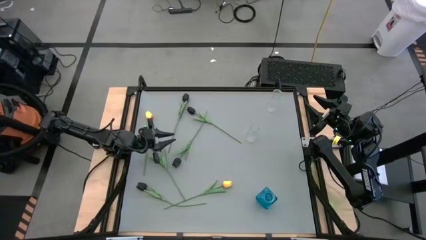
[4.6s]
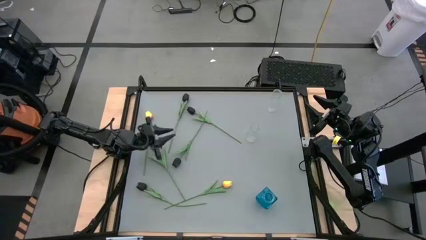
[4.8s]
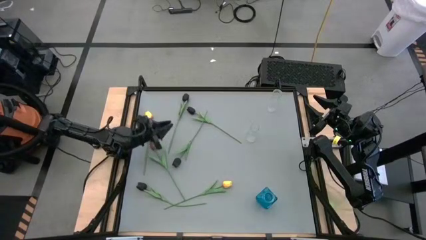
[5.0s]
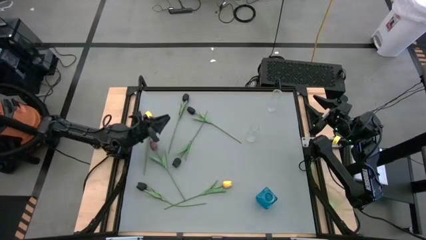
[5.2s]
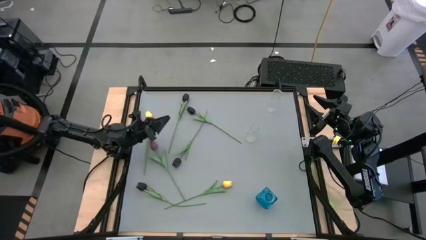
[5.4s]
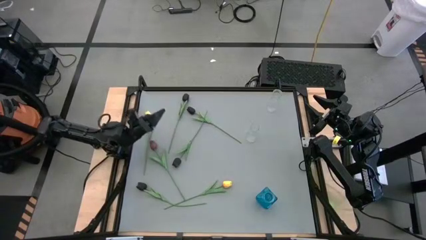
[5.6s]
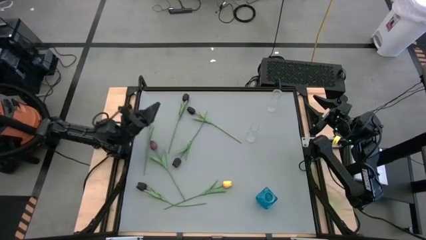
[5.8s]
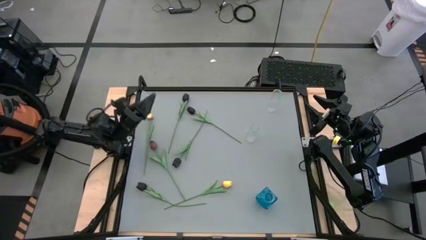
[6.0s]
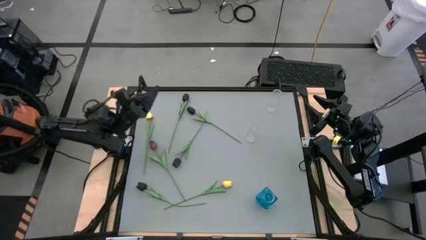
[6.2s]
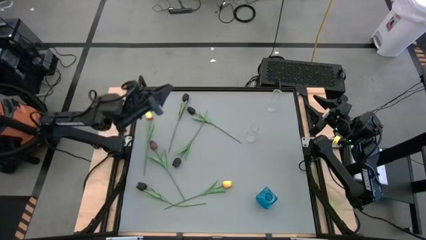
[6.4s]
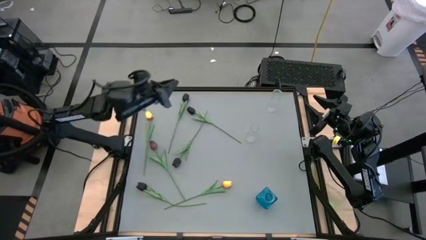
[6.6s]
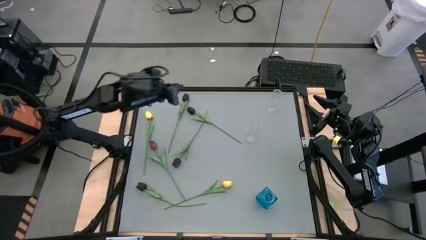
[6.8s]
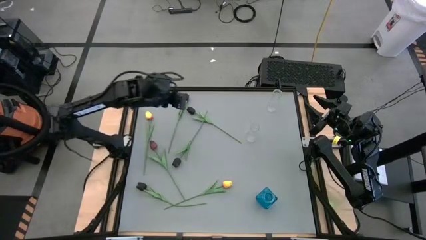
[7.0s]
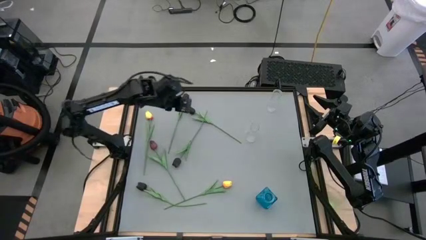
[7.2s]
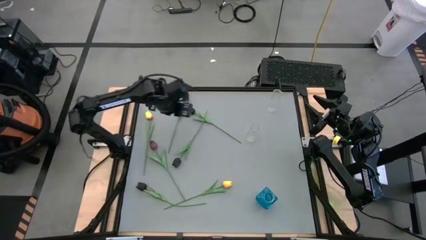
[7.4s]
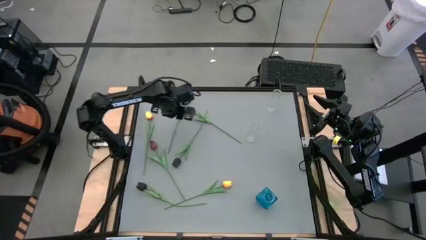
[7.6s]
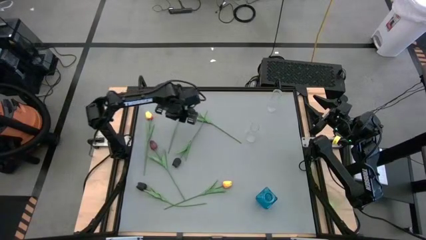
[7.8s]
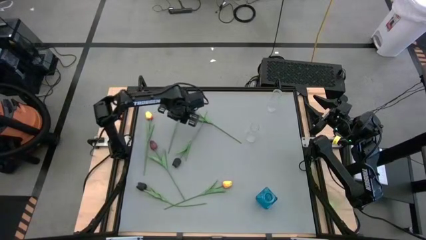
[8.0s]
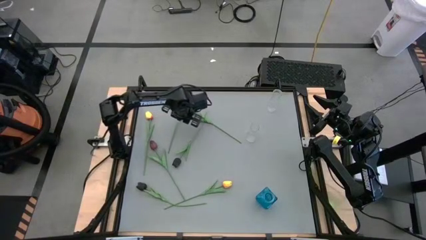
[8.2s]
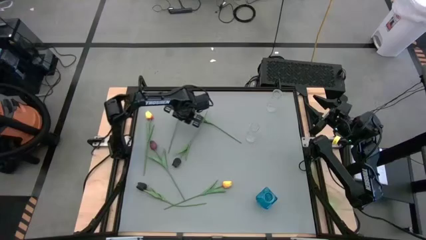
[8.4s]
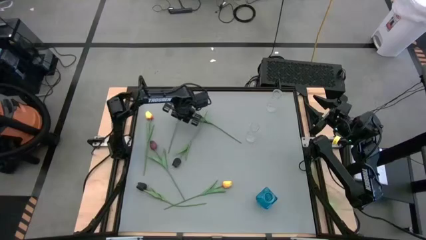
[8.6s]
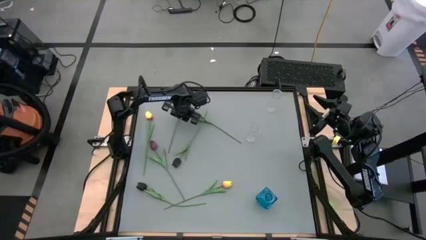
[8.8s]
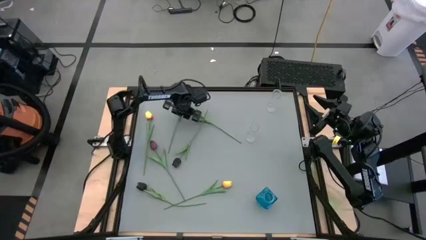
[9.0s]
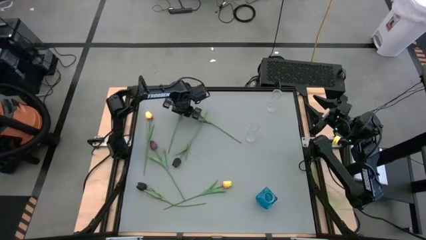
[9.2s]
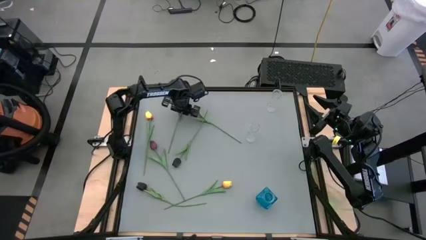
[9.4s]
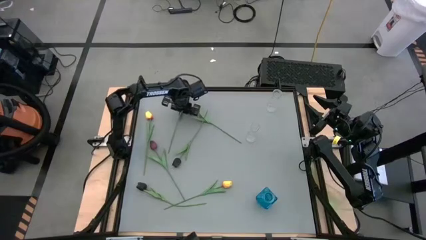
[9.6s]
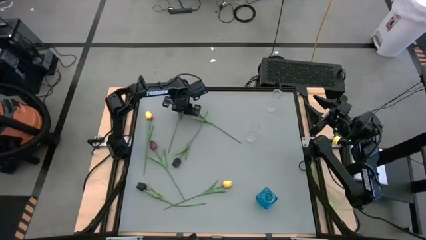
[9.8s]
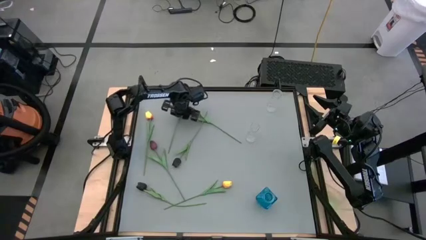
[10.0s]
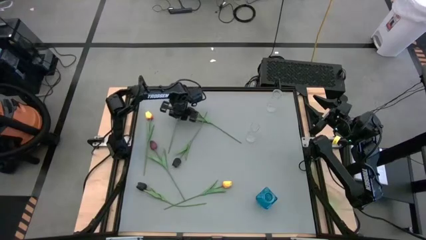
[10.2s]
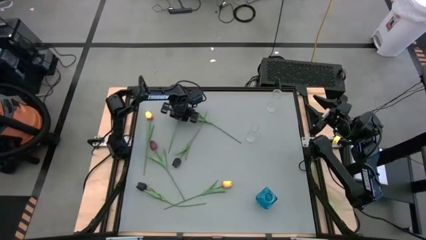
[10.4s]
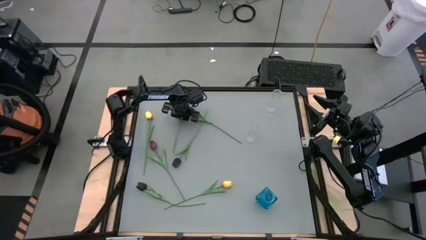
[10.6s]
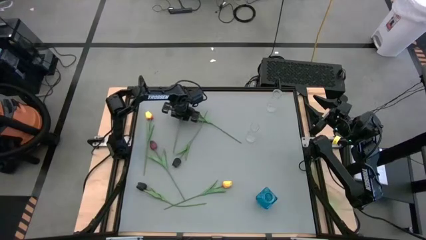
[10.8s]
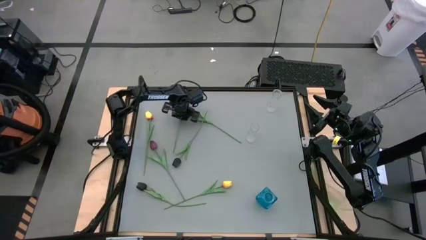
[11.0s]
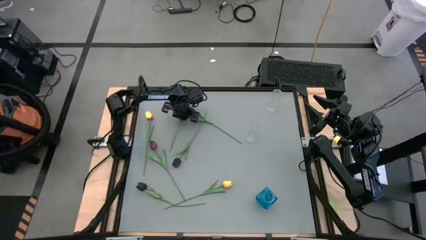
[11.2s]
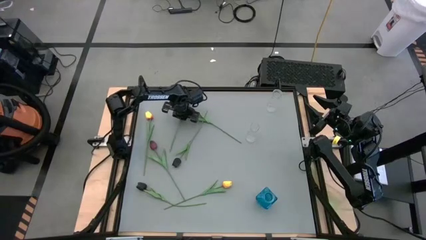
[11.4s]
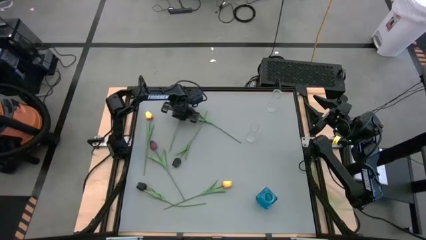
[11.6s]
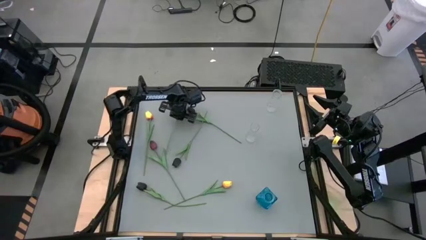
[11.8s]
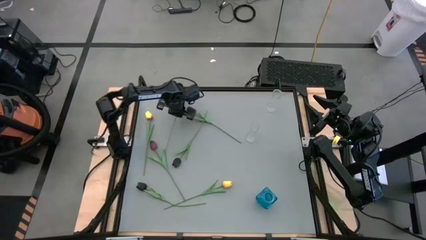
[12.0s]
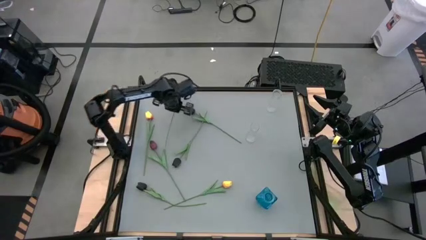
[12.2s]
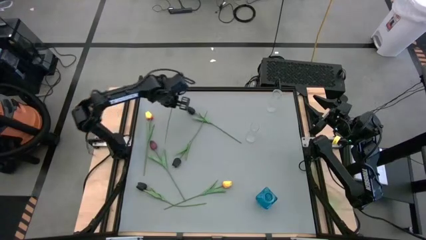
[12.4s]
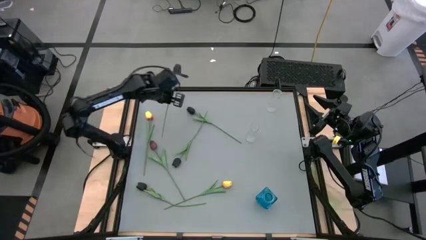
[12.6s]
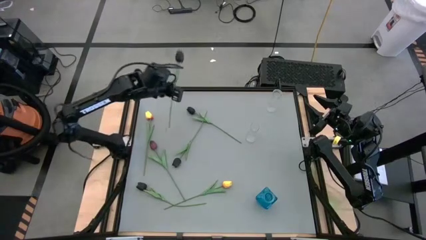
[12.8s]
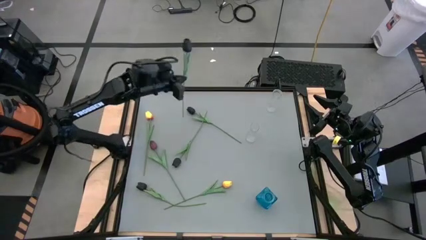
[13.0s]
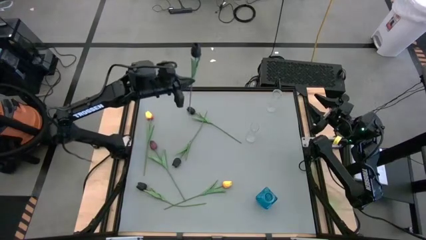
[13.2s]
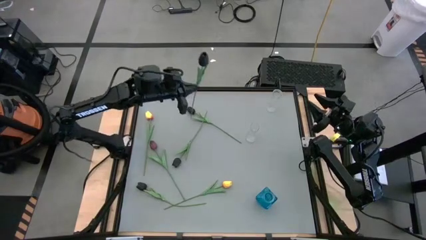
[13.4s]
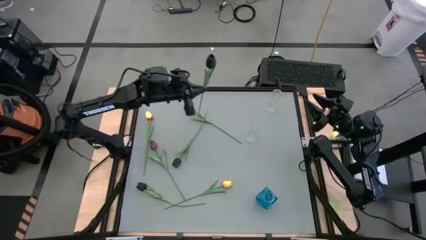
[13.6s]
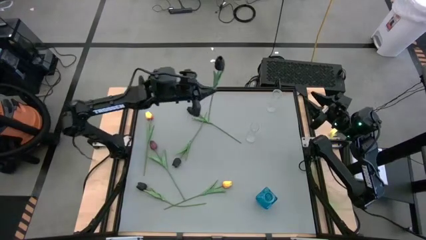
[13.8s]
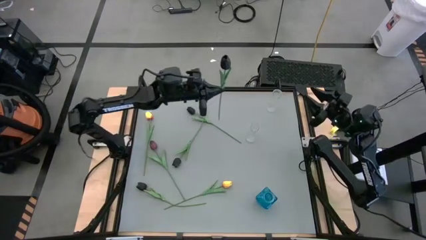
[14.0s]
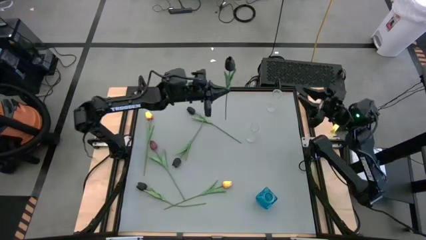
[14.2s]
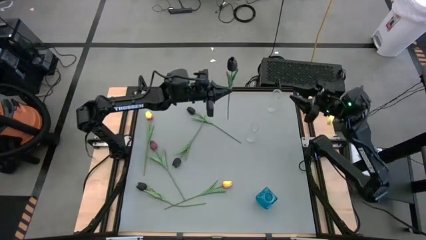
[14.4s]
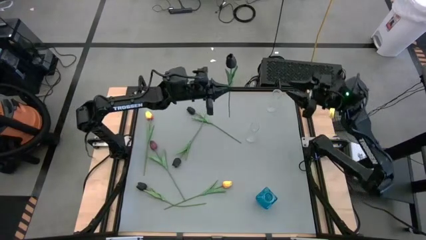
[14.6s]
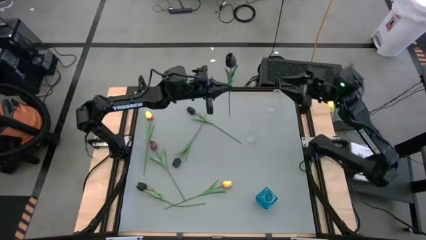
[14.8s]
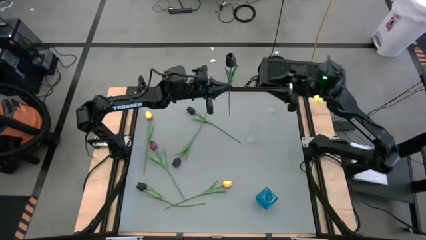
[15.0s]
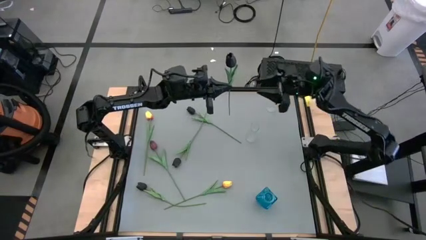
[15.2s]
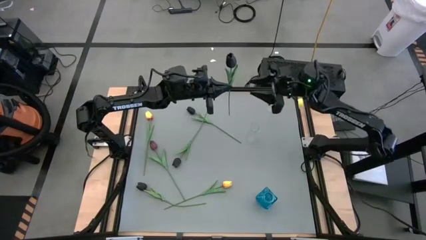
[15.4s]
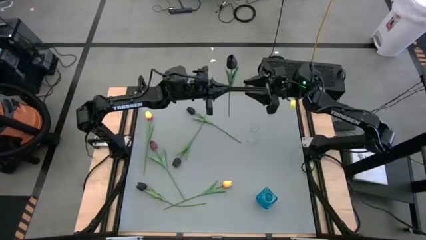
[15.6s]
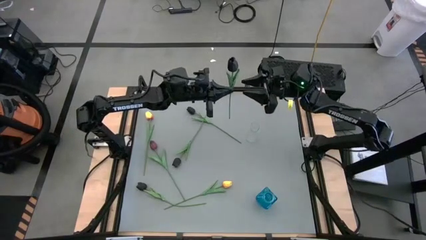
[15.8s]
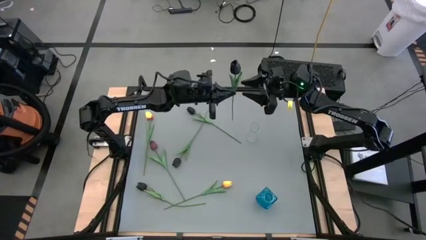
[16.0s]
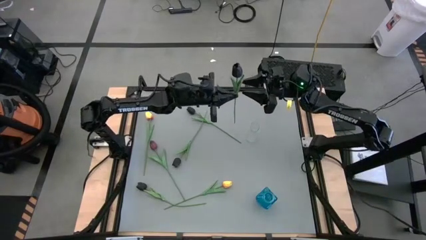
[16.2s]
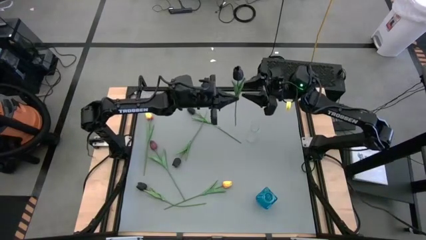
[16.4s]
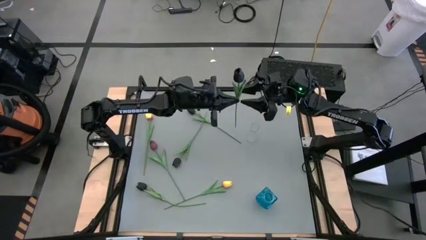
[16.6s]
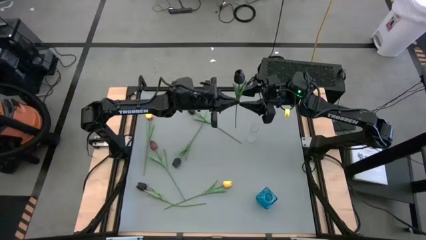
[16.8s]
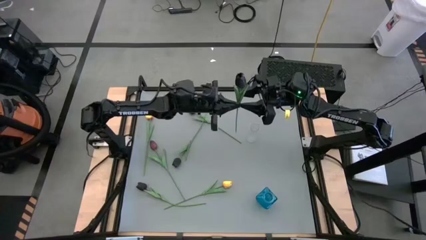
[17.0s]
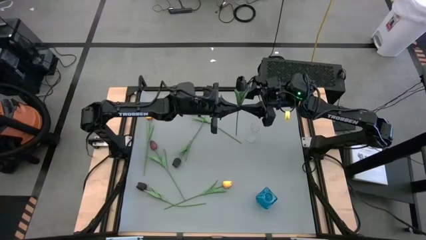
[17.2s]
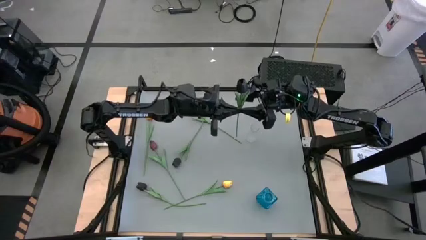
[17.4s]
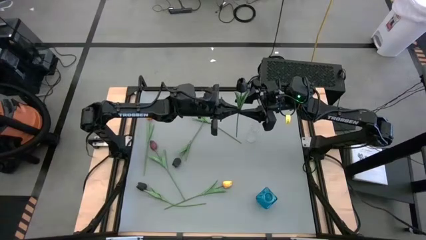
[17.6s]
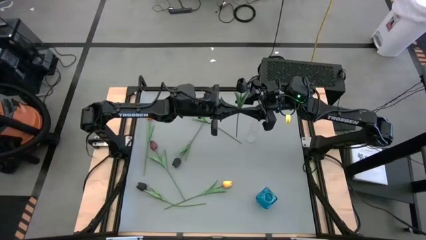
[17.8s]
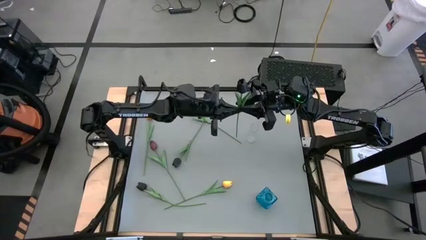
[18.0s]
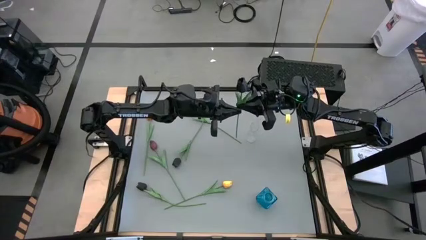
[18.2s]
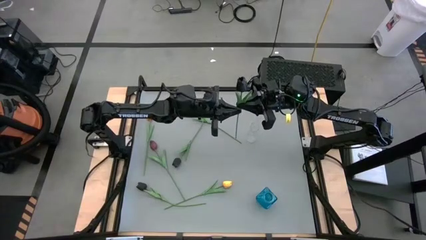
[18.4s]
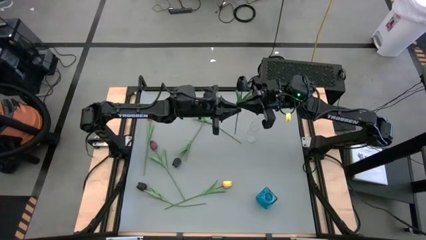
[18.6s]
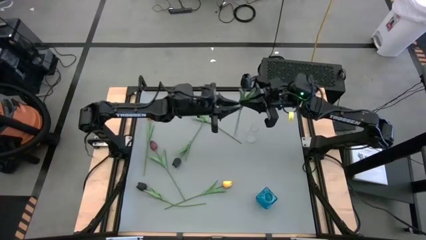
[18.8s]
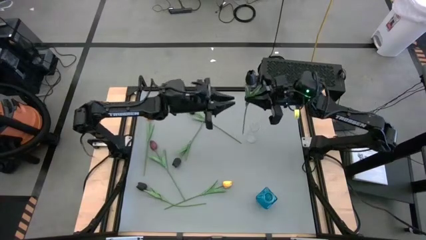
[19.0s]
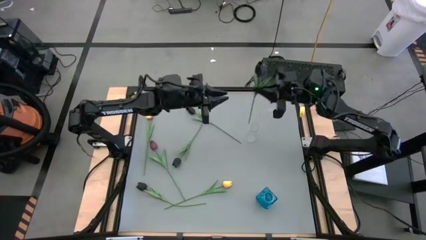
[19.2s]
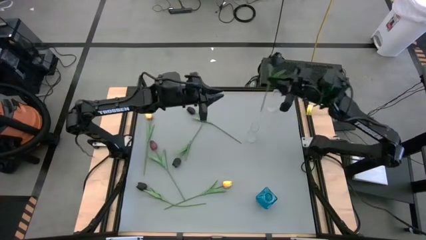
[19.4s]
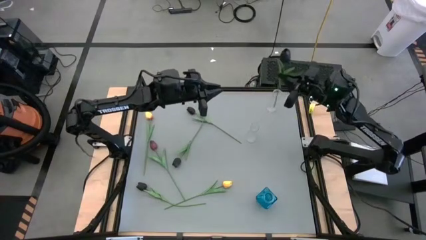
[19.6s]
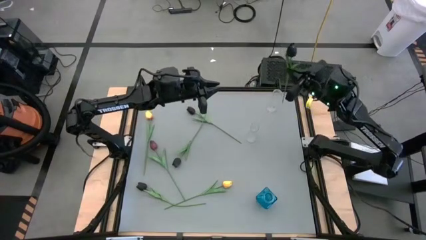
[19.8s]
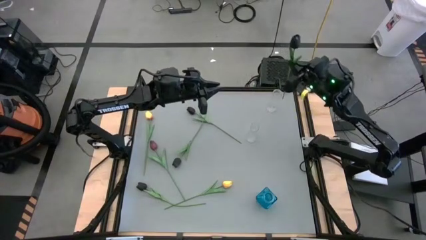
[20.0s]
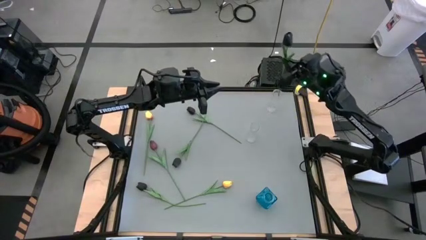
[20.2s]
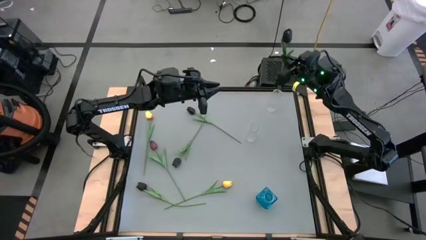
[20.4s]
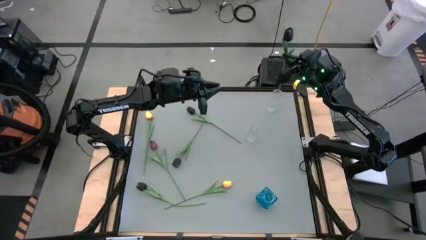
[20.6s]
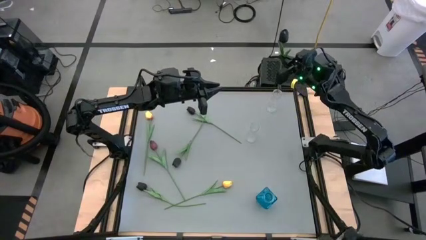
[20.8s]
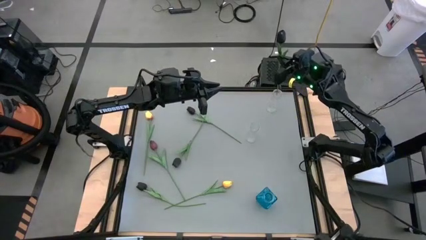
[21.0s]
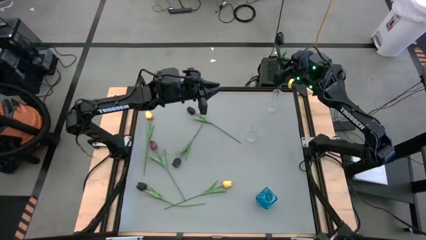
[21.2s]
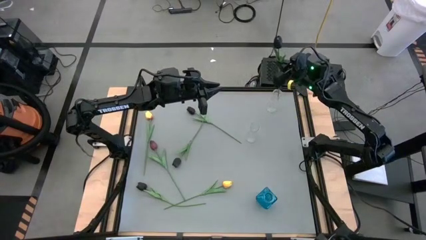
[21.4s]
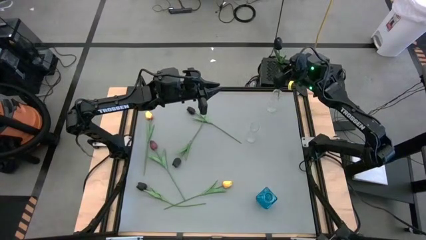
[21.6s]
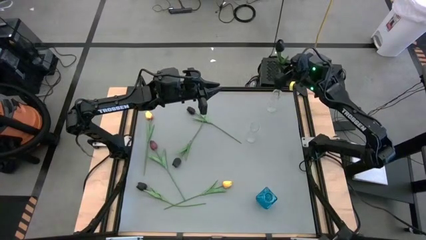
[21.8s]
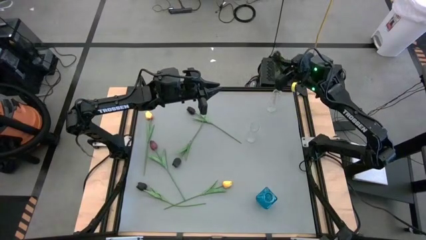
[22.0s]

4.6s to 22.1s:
Task: Sort flowers into vase by color
Put the top left black tulip into the top transparent vase
